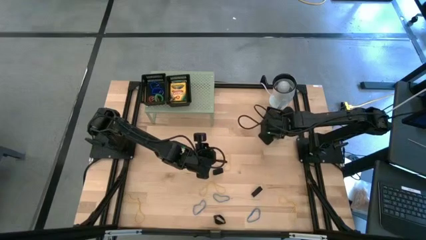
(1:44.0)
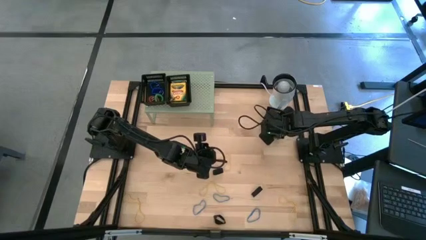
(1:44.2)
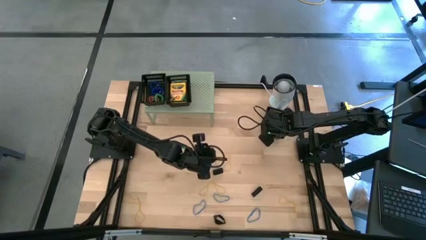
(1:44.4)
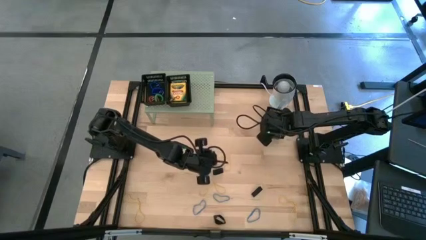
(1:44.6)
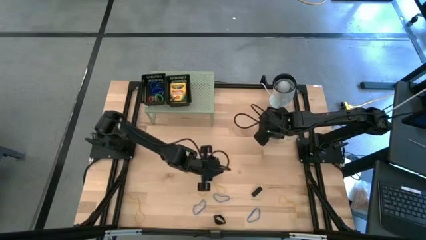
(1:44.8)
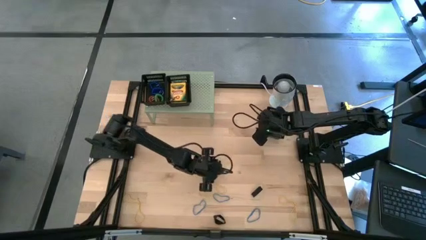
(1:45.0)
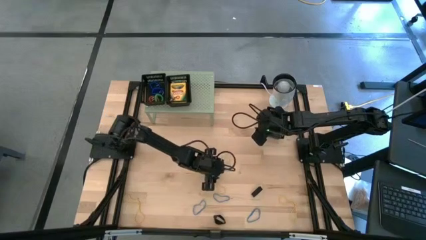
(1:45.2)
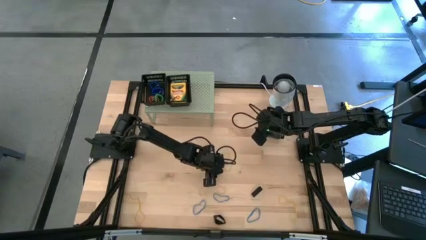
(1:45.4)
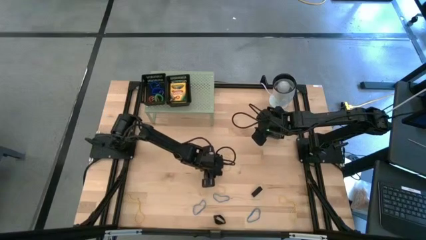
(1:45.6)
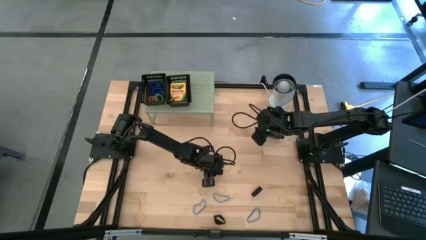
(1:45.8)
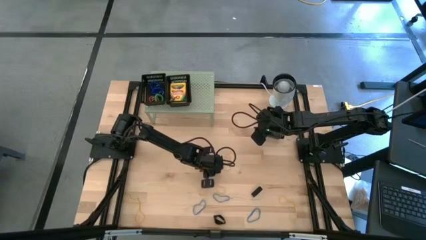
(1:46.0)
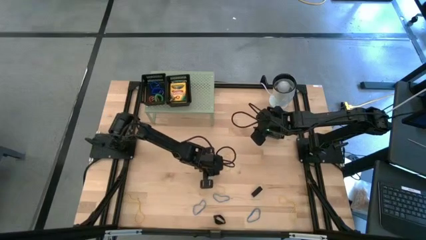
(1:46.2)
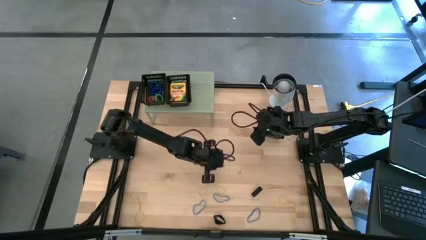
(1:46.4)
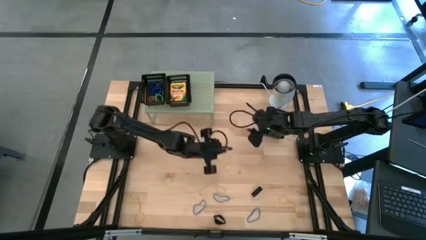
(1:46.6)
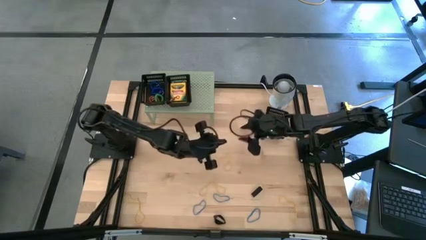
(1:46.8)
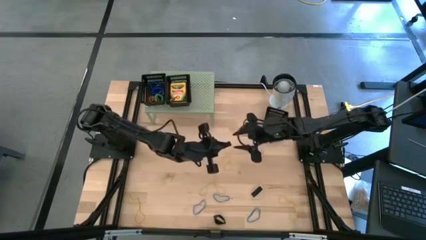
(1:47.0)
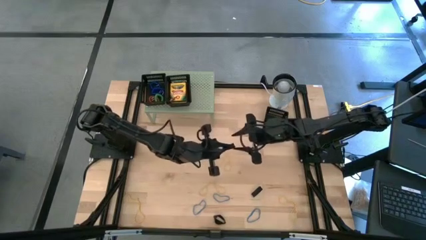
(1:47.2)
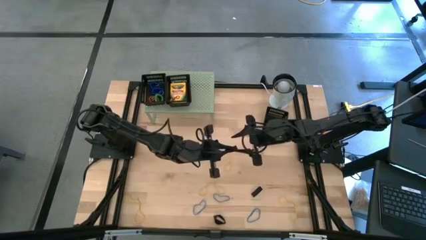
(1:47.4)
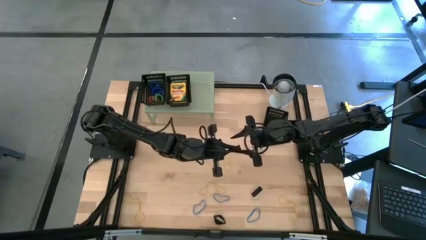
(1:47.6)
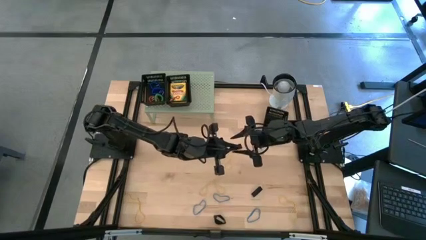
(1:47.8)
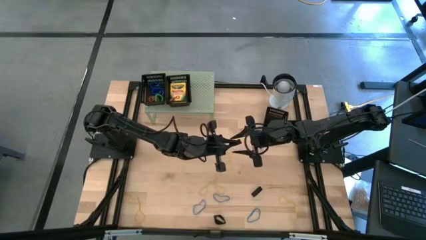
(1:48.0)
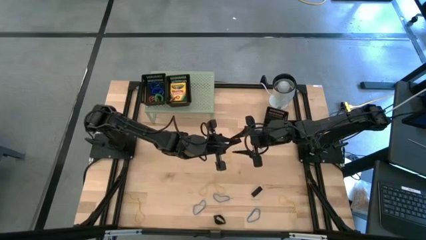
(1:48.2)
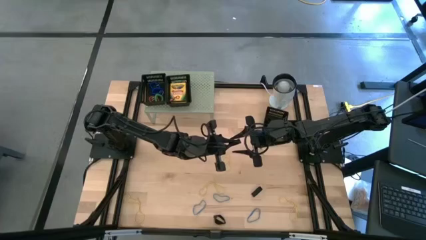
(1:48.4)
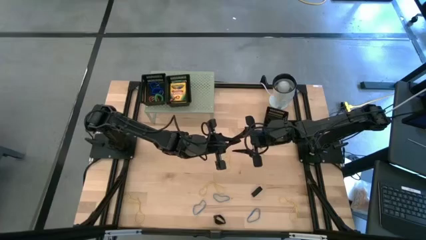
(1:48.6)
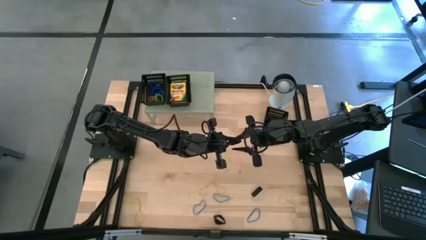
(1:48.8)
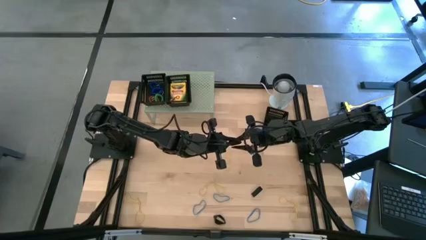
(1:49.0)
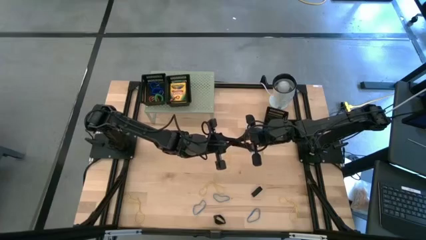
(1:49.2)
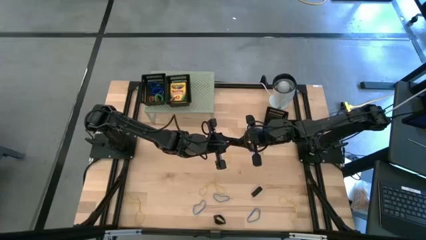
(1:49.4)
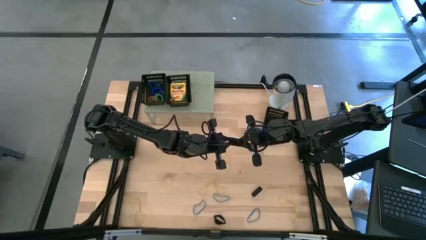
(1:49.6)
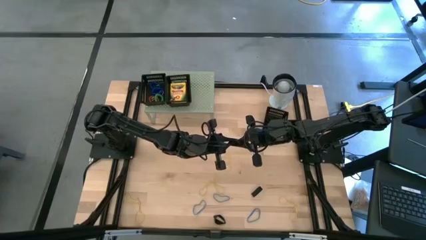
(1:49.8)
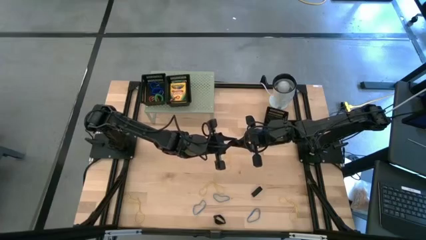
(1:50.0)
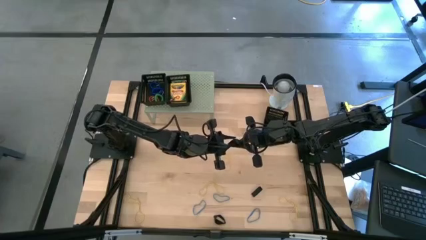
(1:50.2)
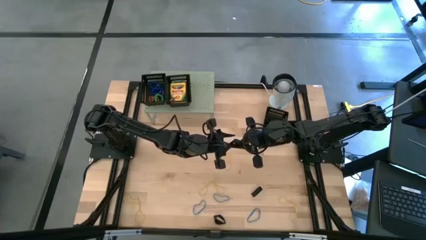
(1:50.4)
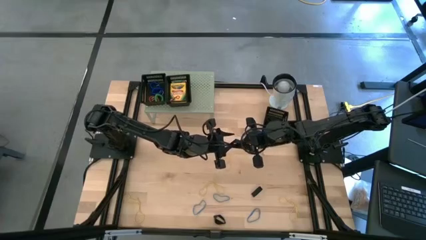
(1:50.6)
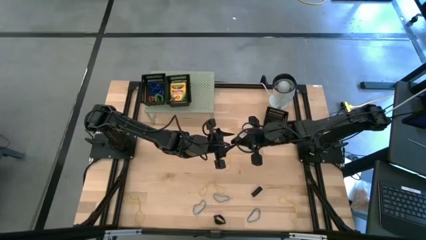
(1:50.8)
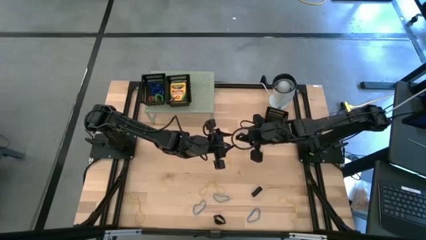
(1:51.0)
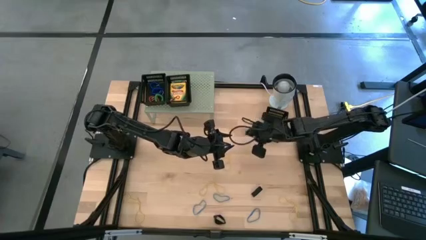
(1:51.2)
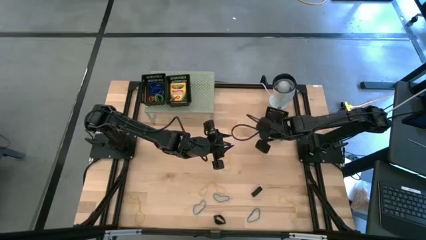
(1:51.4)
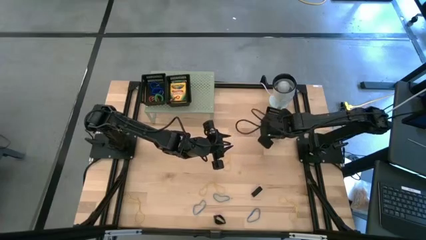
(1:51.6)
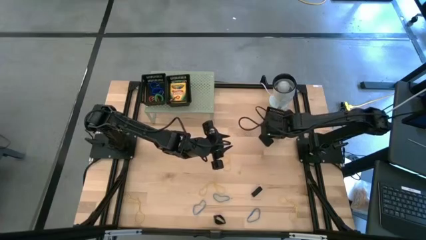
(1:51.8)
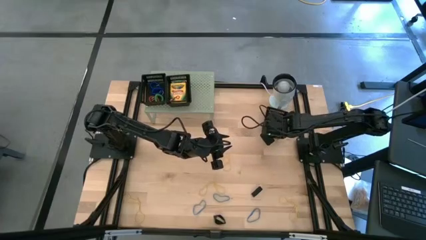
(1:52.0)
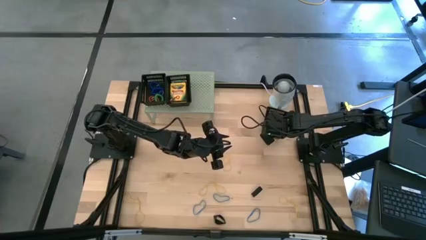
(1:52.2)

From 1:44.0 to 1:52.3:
Task: Pick & Place Office Desk Supplies
Put the black rubber band into the black bin

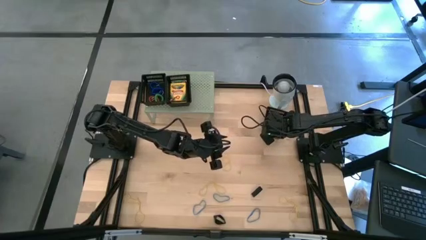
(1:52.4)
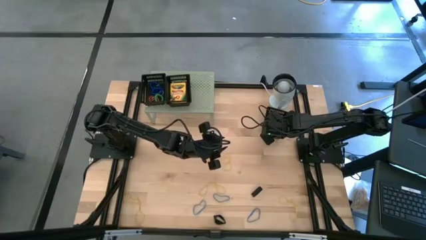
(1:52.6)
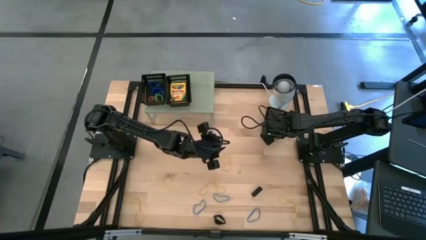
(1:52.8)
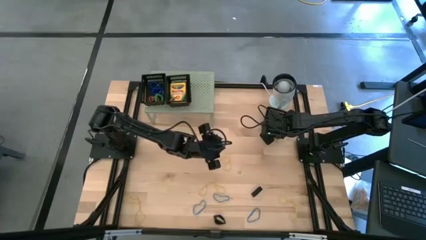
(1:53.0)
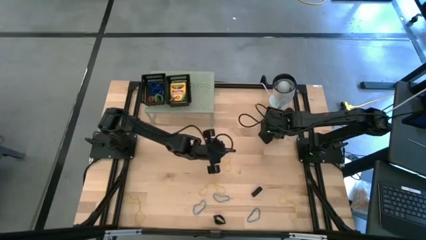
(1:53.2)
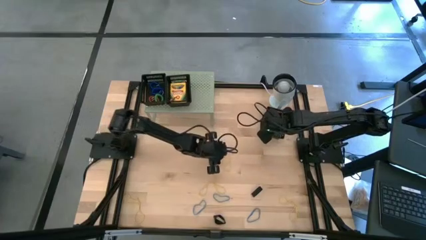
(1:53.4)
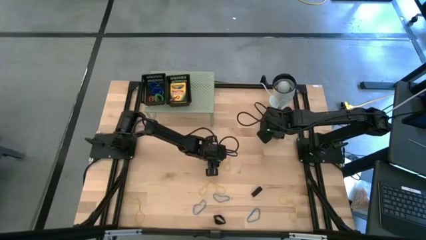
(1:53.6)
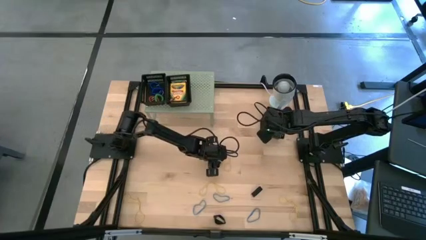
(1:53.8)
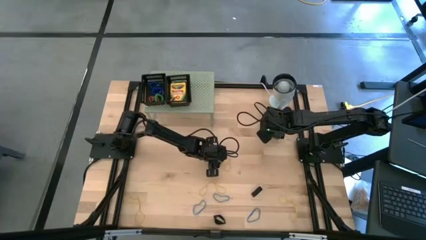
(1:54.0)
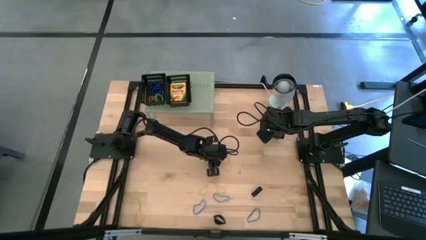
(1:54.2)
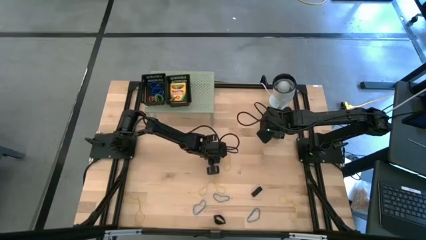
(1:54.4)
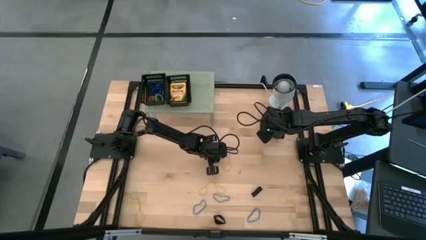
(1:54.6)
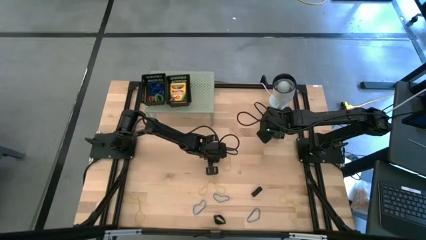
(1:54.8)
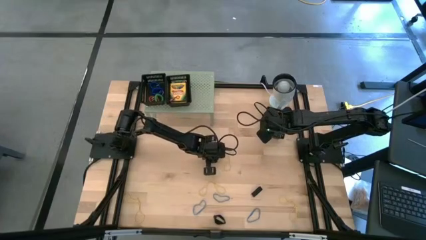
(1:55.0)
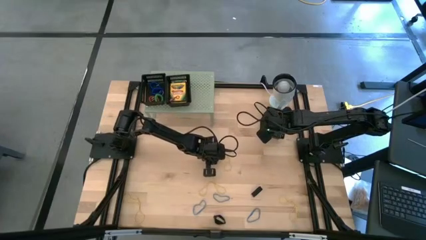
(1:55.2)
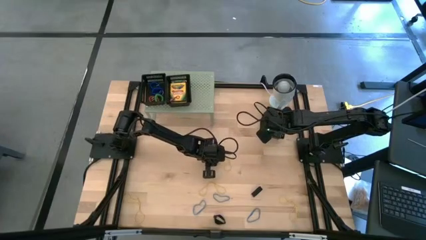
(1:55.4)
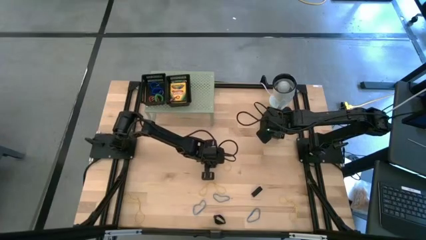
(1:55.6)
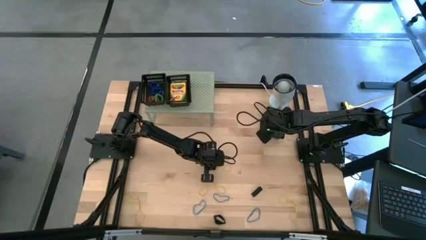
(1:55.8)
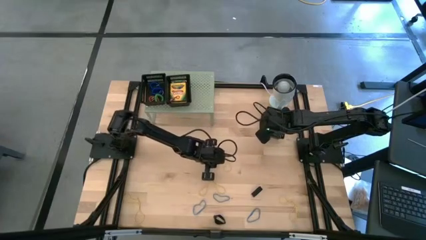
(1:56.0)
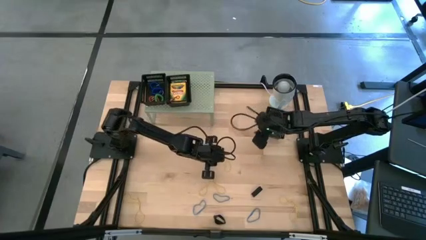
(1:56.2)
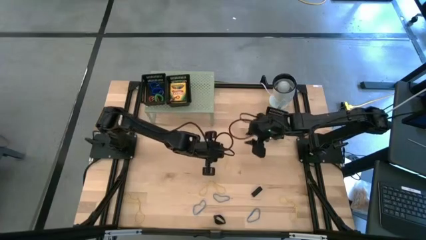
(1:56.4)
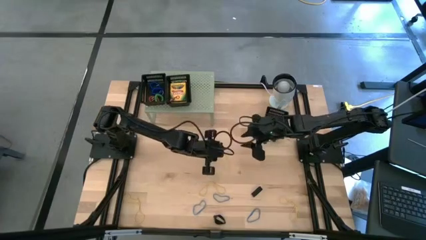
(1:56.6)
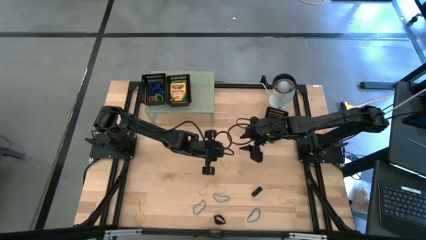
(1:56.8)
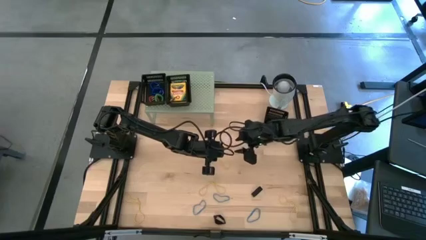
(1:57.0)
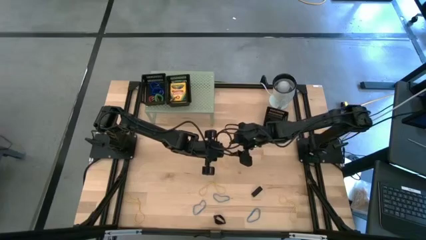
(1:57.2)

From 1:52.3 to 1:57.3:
Put the yellow rubber band into the black bin
